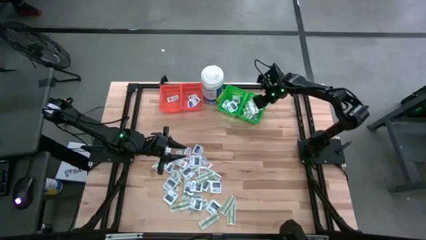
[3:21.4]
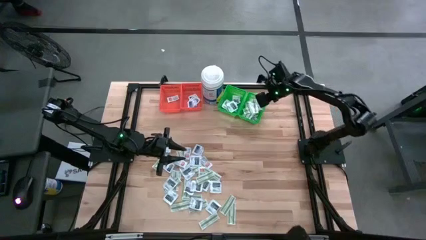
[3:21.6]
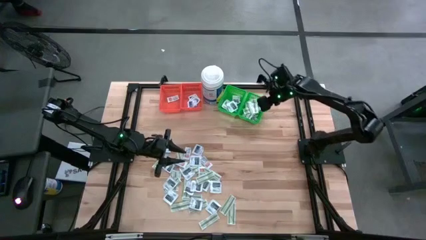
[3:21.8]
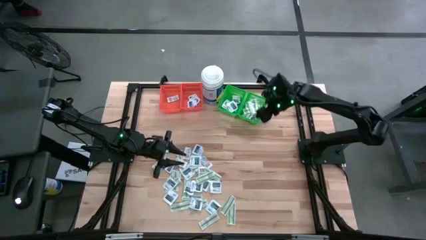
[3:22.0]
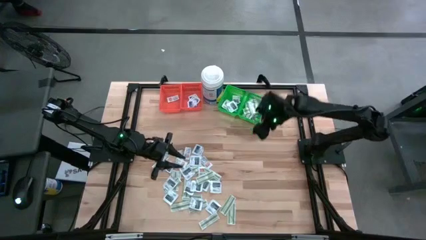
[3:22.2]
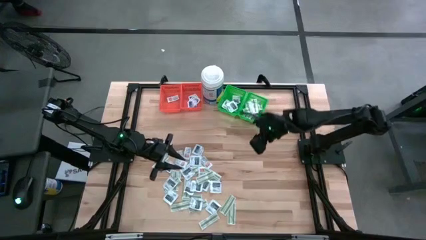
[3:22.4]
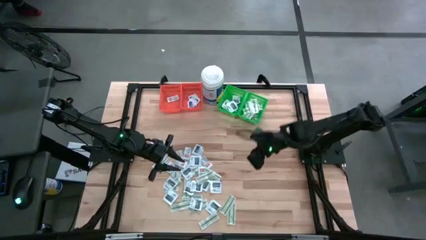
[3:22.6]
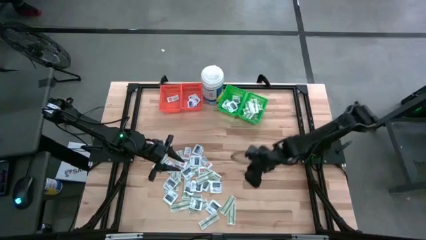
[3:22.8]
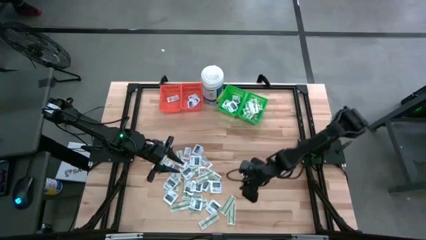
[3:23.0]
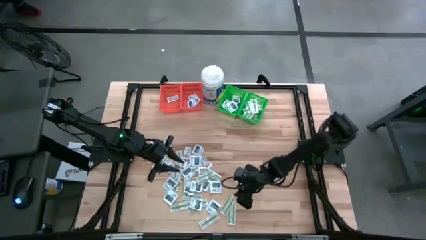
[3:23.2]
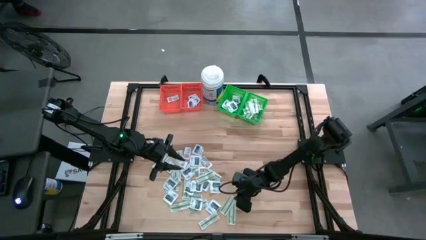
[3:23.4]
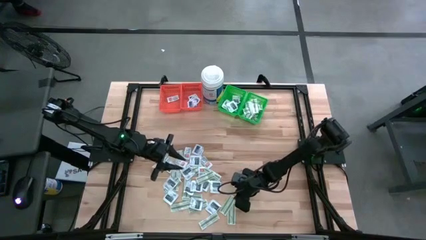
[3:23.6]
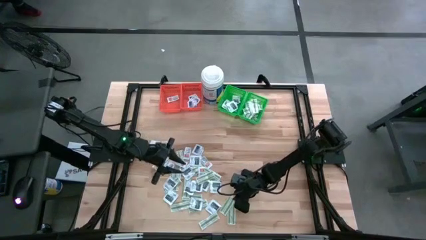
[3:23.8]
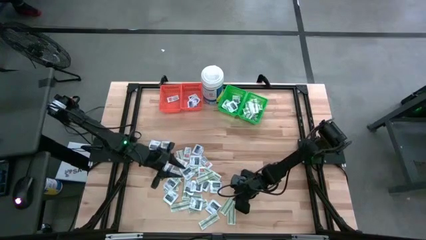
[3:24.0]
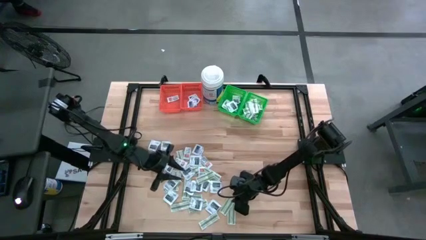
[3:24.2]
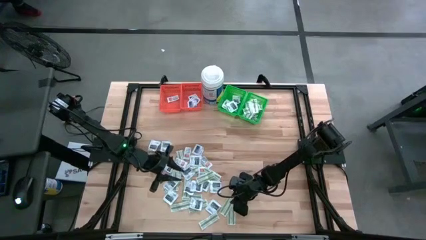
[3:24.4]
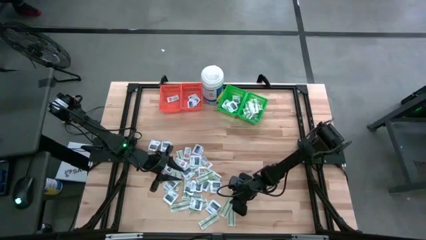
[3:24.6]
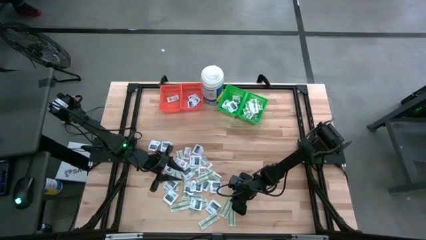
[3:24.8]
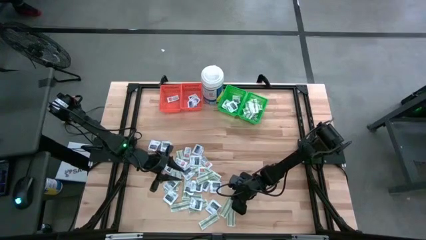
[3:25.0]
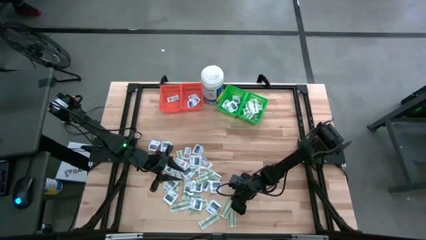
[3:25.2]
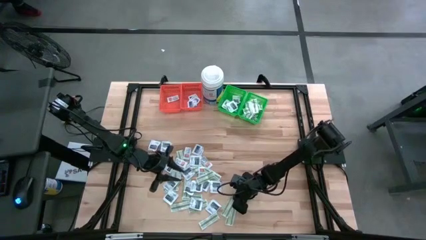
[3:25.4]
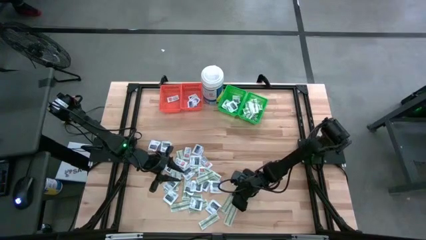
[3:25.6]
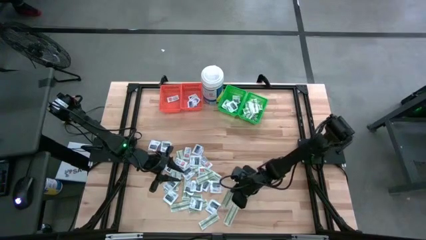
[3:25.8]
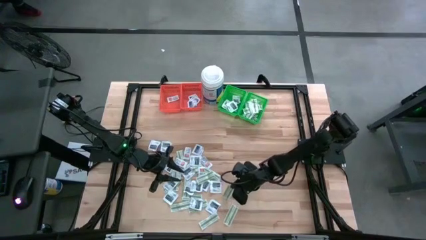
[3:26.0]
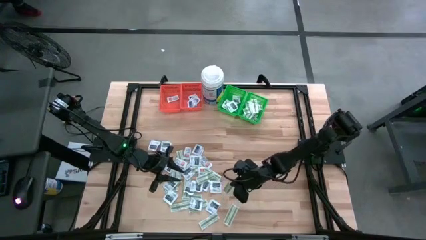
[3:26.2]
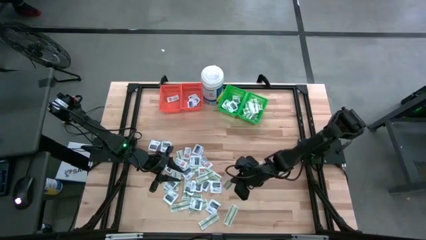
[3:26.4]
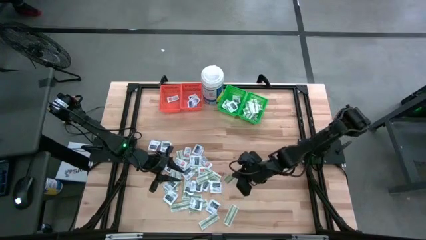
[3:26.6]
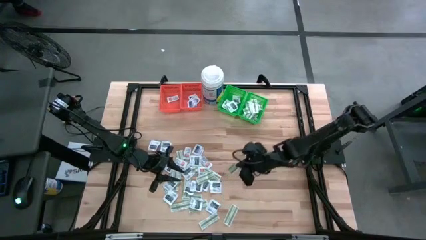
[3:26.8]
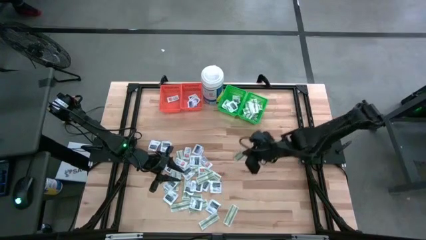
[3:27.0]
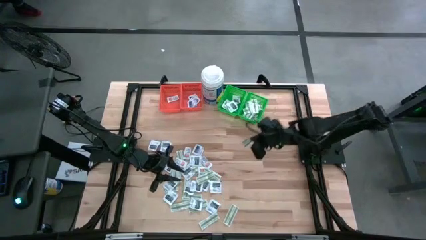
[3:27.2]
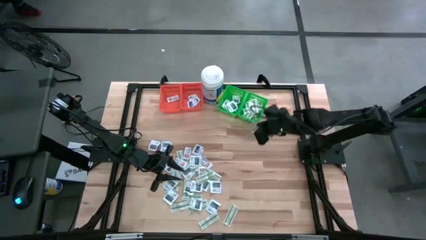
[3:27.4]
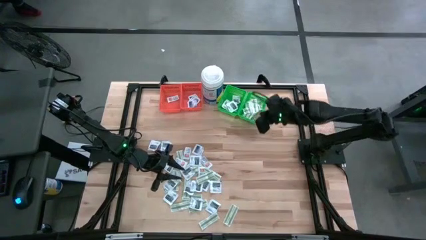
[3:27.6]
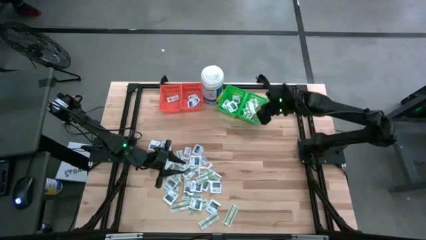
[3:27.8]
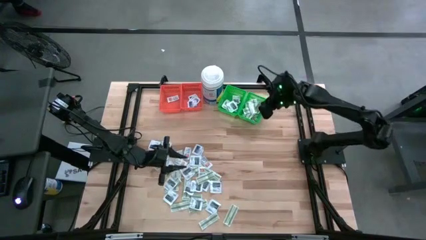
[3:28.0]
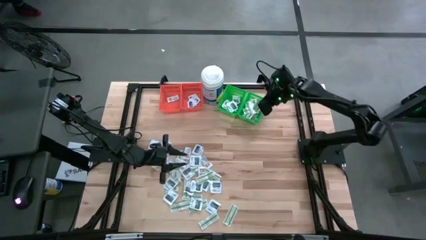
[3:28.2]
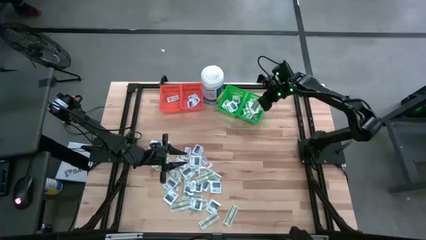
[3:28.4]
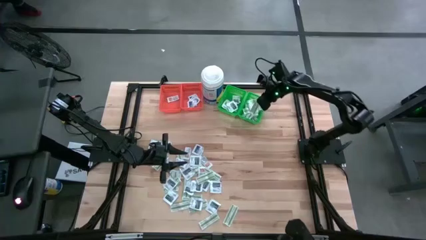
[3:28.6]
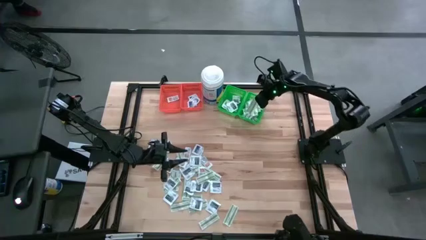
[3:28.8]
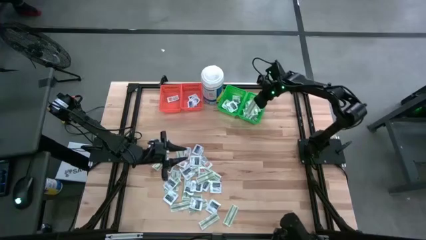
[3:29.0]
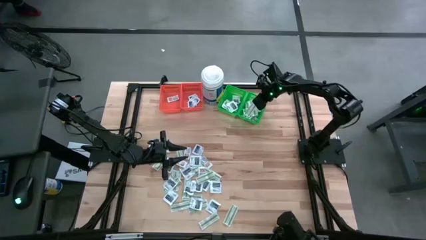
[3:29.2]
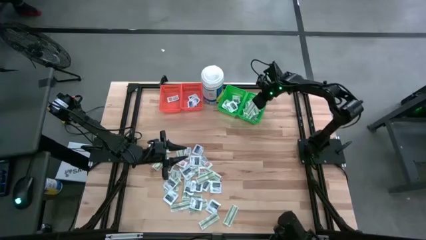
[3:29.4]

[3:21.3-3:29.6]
Task: Pick & Place First Aid Supplies
Put the green bandage pack into the right green bin

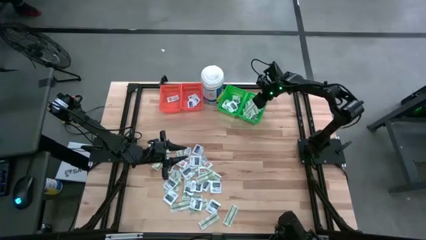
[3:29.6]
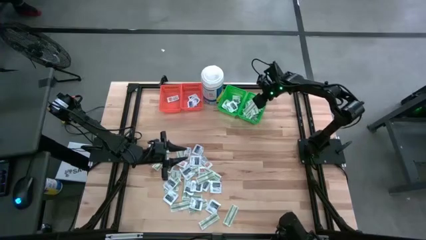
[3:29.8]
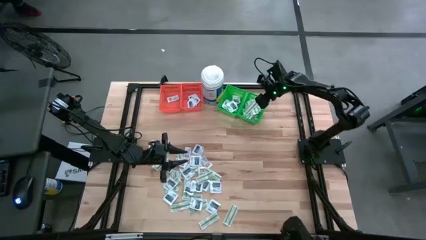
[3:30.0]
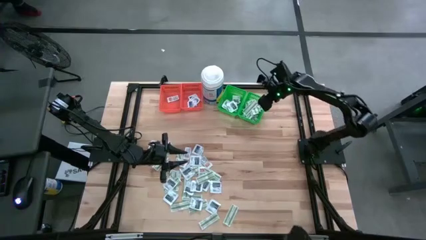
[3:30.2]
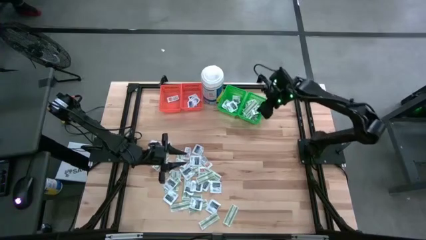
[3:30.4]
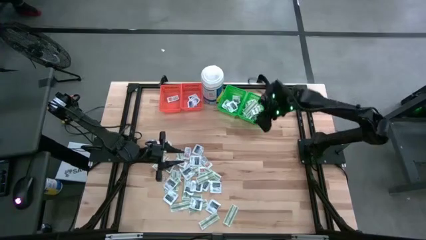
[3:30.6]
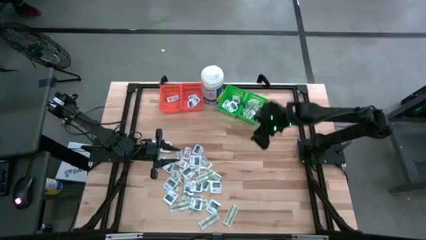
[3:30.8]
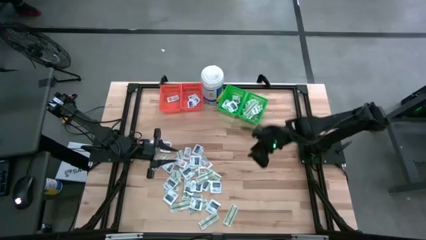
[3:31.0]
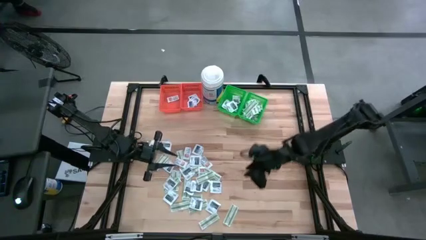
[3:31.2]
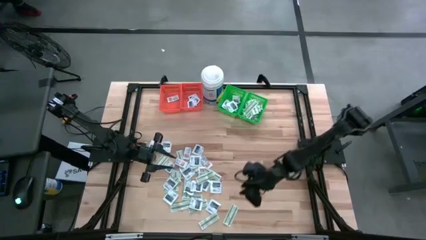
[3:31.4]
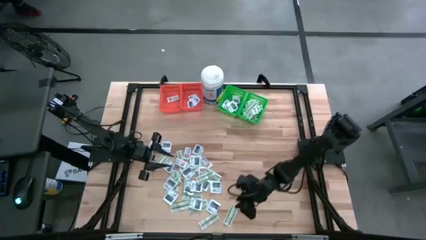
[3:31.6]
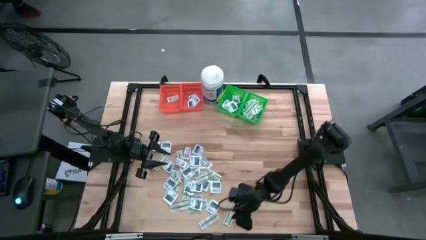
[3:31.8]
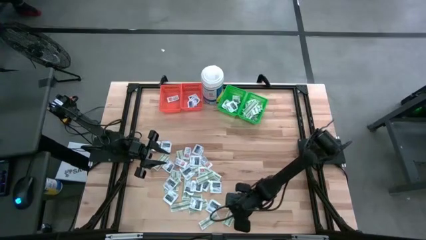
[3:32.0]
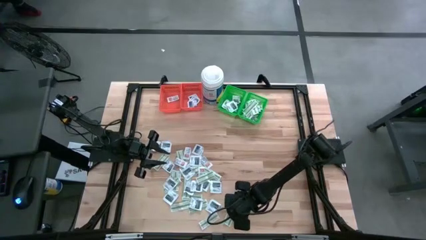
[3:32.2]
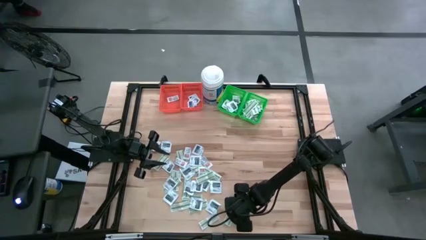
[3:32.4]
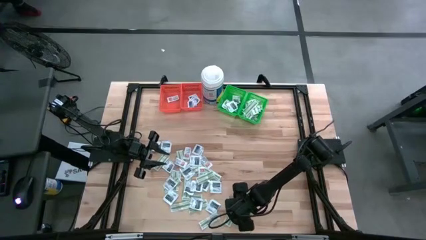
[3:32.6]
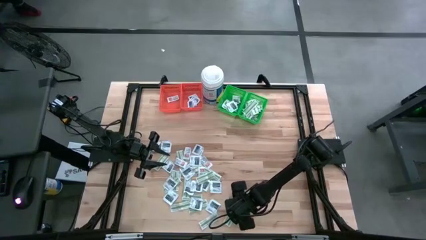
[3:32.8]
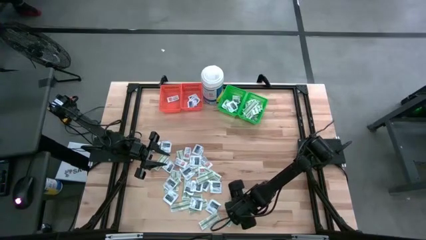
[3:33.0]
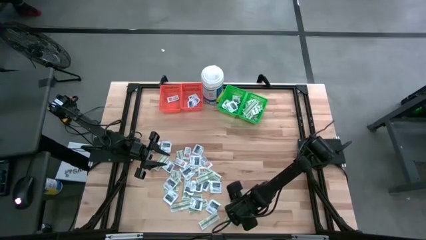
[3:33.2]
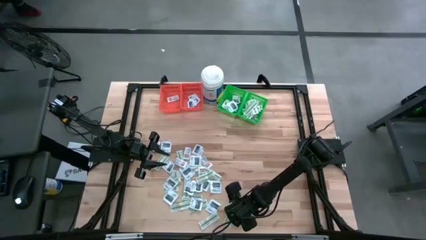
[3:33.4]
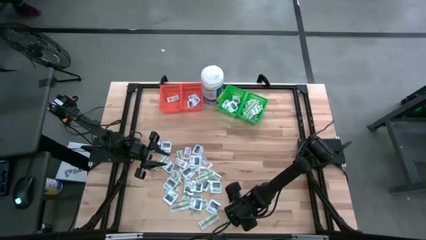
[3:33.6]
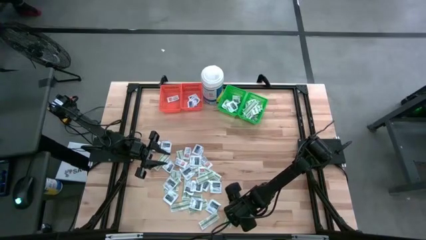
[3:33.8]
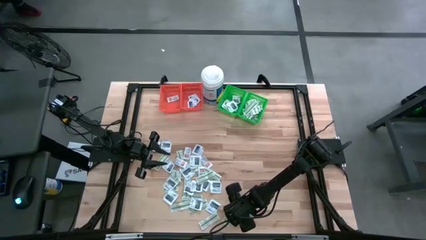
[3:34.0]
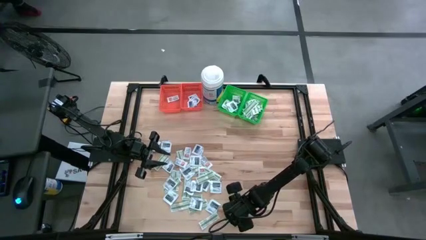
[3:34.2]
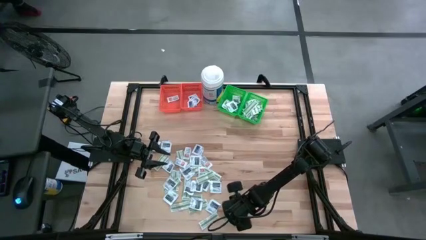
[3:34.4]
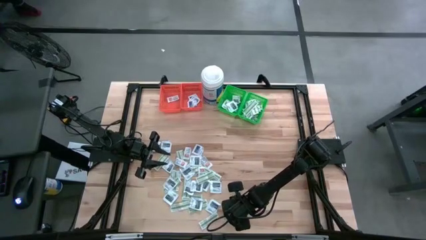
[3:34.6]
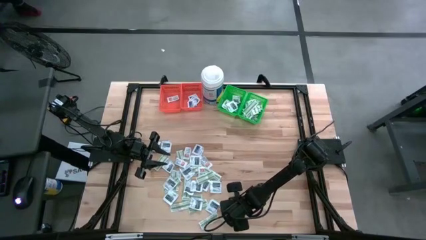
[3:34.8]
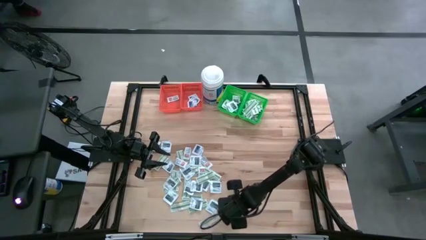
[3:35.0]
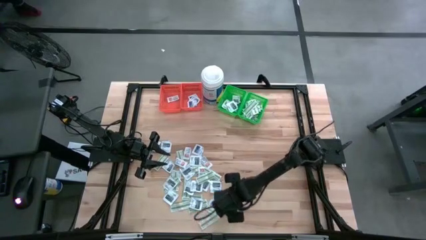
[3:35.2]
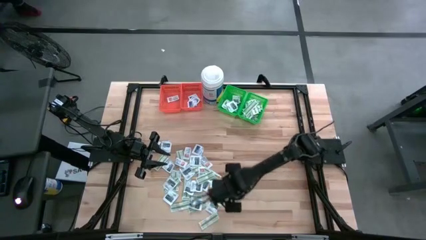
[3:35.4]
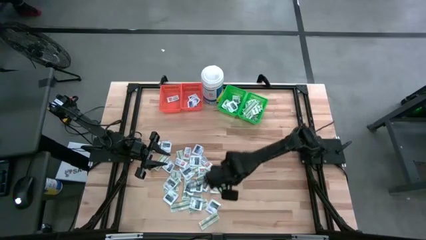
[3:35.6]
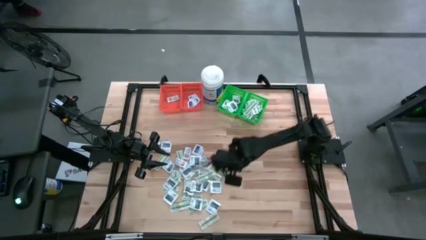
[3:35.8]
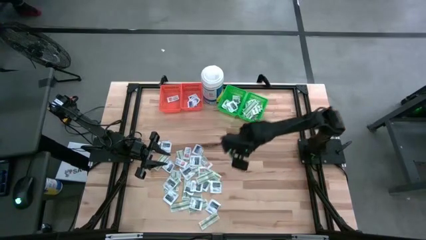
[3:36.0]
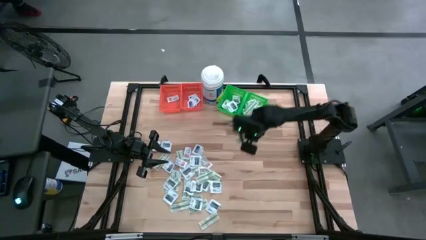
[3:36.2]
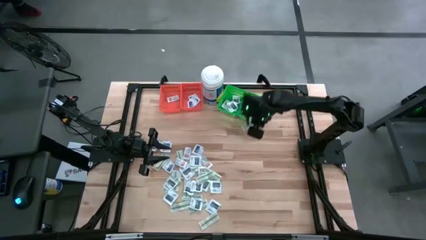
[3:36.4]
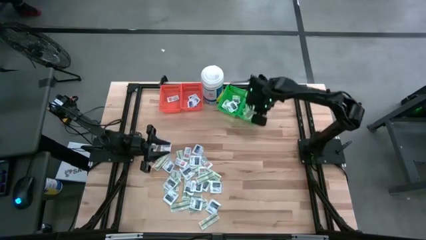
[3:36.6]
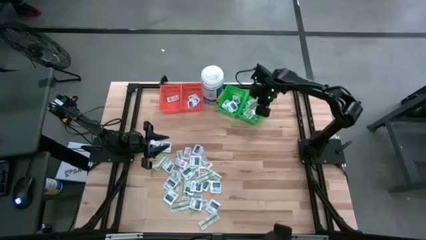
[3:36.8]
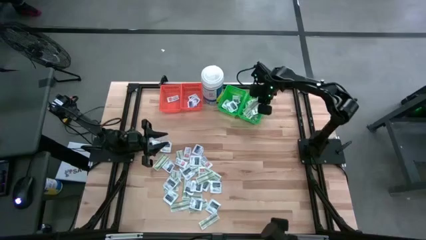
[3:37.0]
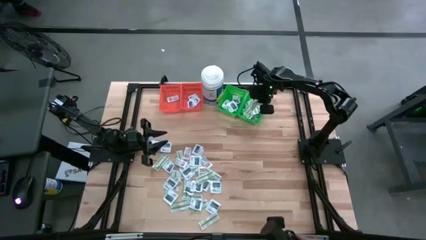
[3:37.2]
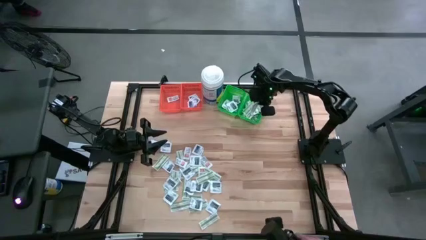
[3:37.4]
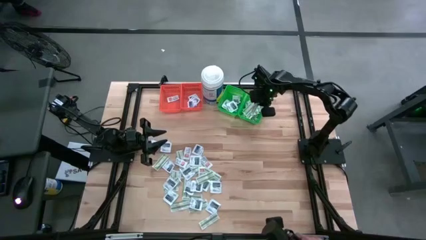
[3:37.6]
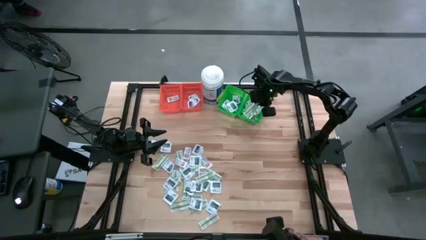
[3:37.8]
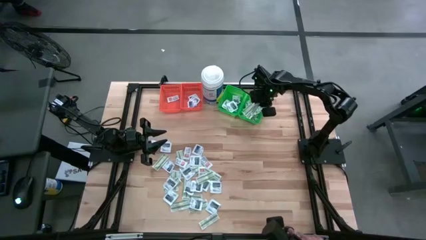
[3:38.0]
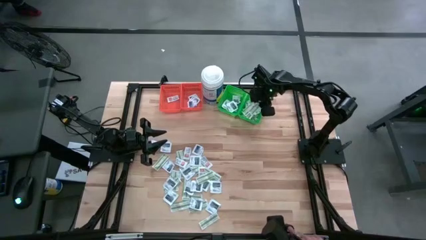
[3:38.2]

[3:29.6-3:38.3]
Put the green bandage pack into the right green bin
